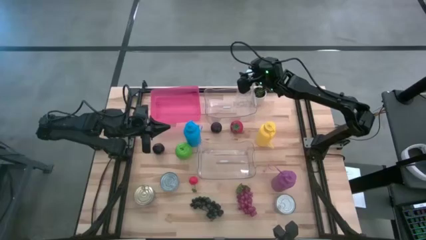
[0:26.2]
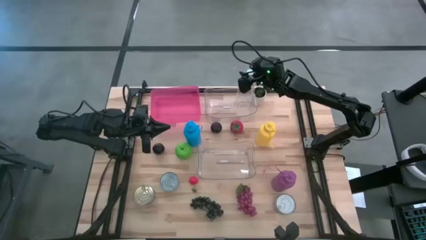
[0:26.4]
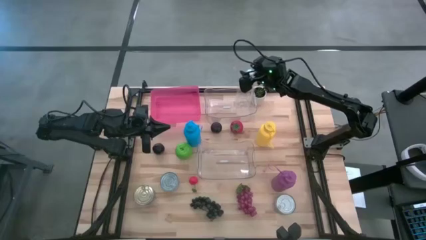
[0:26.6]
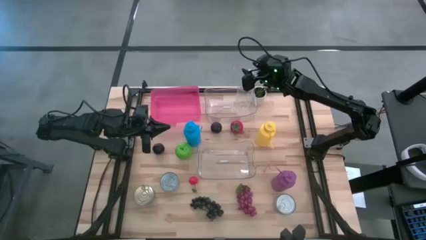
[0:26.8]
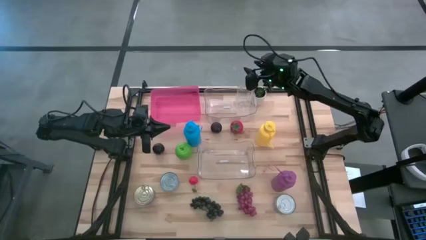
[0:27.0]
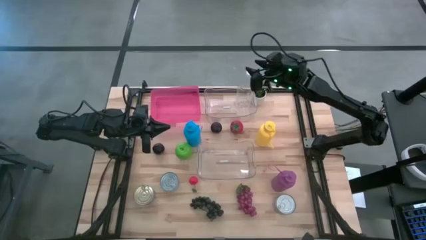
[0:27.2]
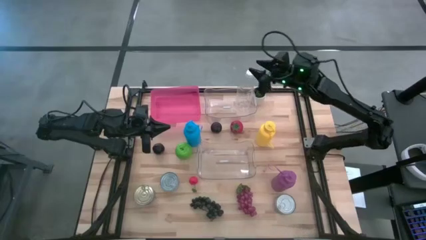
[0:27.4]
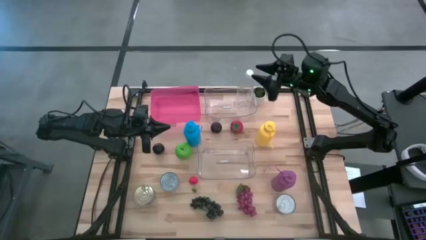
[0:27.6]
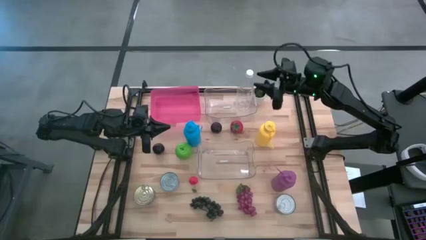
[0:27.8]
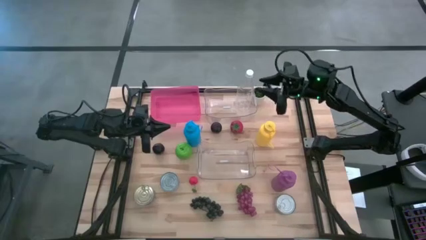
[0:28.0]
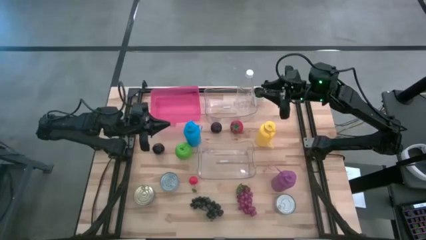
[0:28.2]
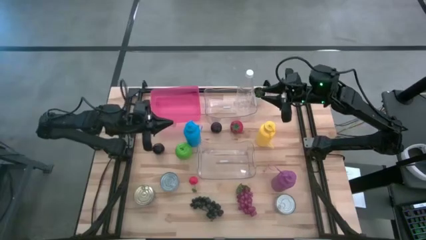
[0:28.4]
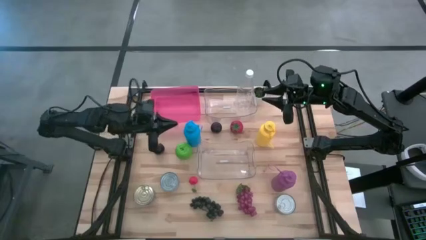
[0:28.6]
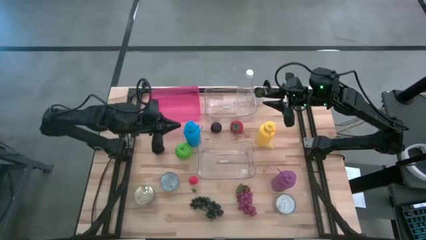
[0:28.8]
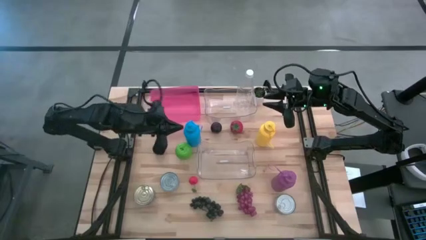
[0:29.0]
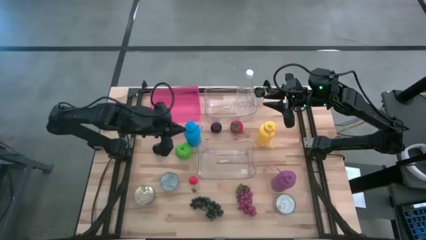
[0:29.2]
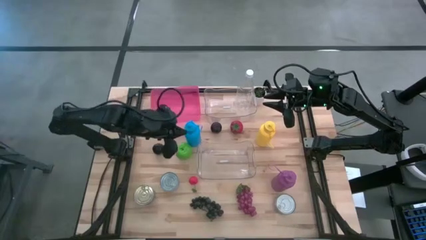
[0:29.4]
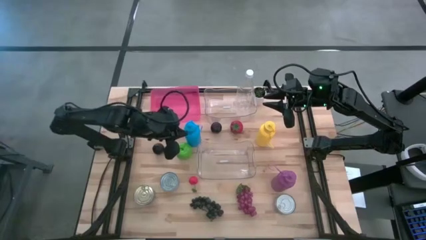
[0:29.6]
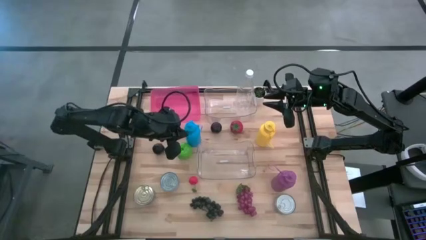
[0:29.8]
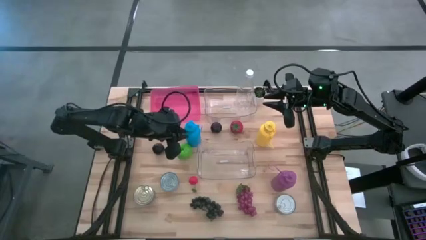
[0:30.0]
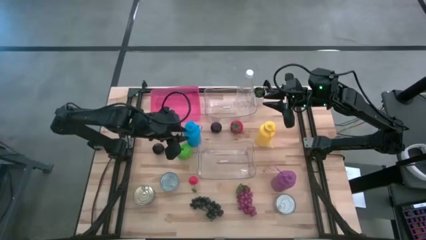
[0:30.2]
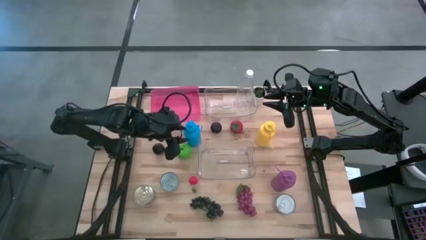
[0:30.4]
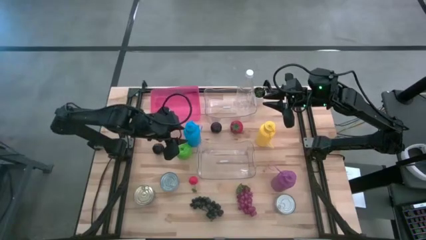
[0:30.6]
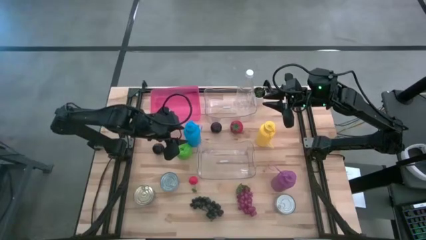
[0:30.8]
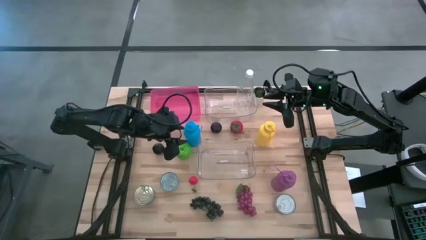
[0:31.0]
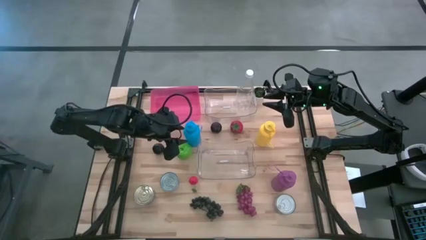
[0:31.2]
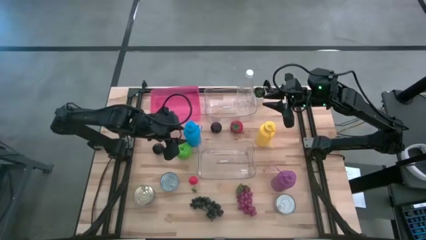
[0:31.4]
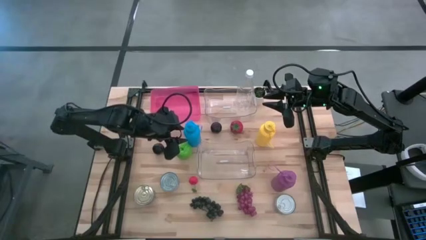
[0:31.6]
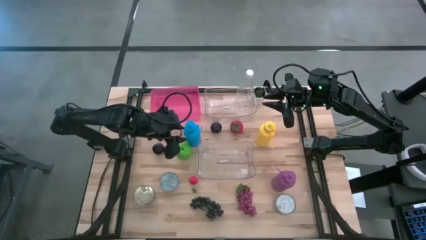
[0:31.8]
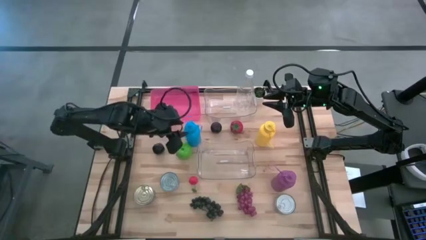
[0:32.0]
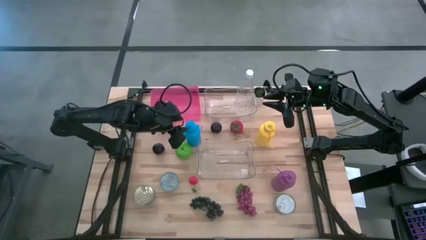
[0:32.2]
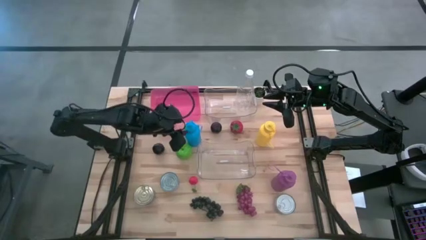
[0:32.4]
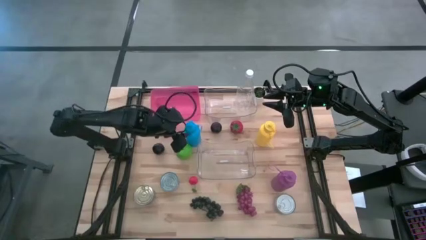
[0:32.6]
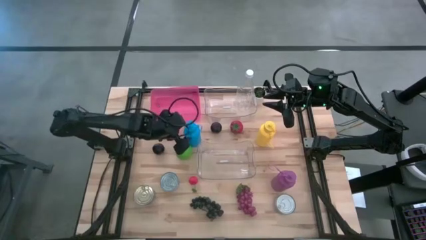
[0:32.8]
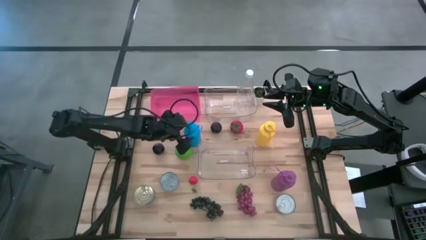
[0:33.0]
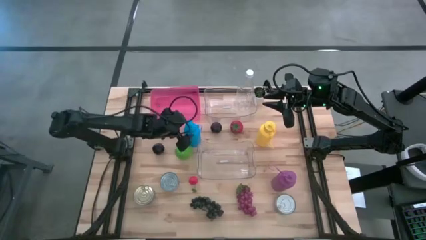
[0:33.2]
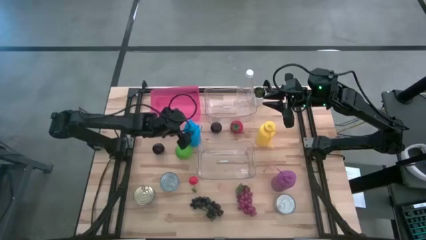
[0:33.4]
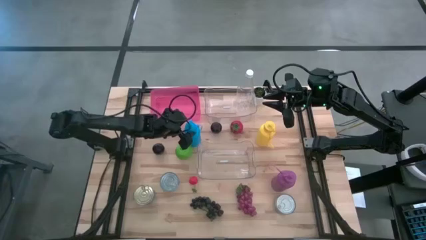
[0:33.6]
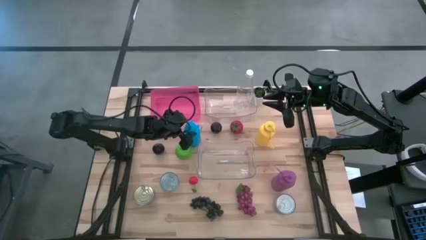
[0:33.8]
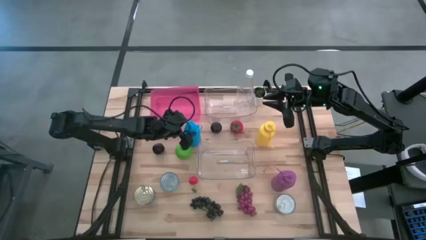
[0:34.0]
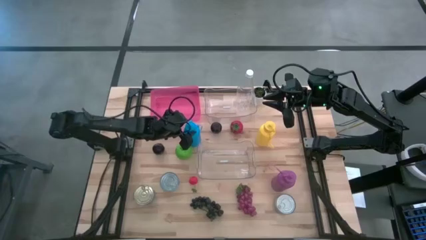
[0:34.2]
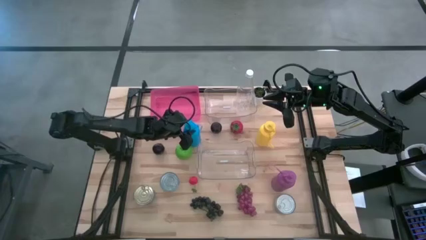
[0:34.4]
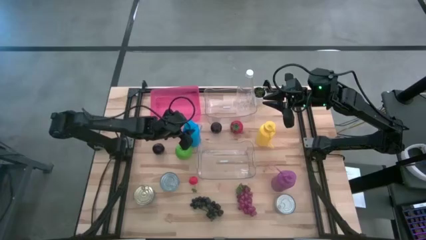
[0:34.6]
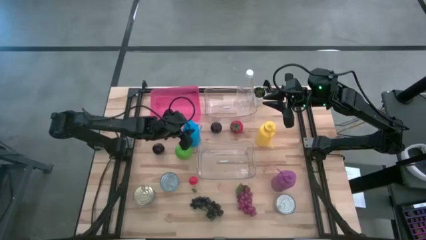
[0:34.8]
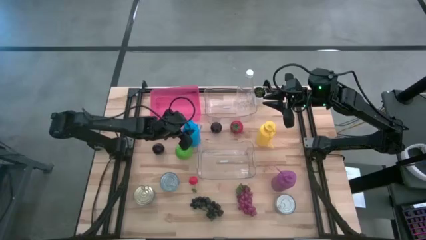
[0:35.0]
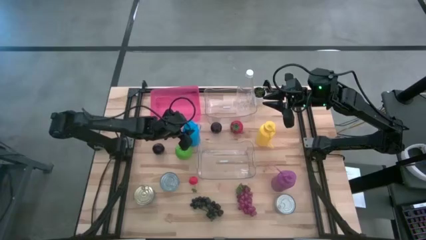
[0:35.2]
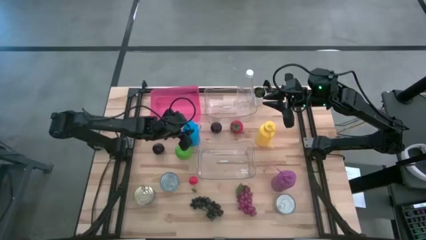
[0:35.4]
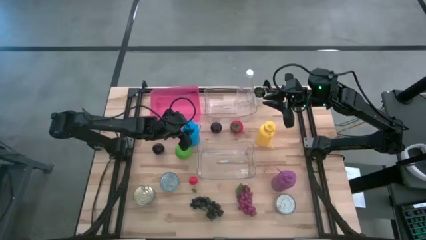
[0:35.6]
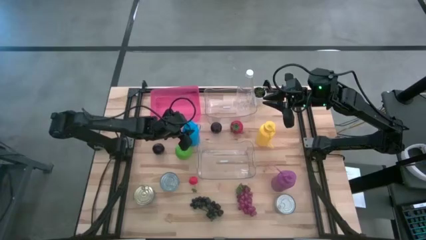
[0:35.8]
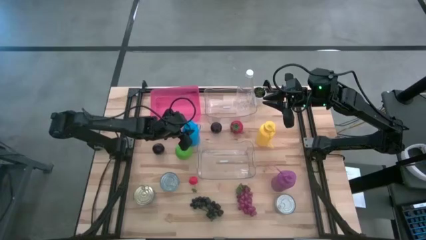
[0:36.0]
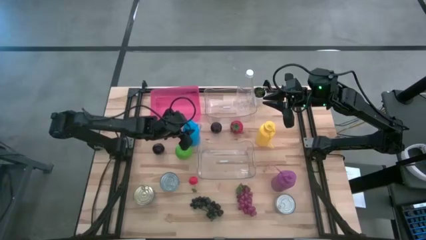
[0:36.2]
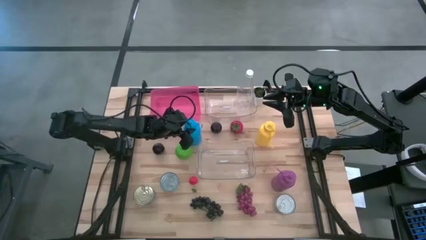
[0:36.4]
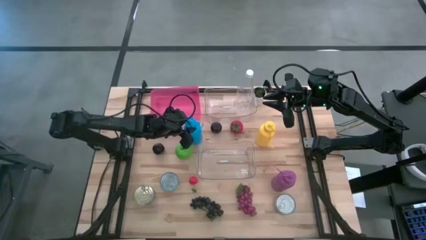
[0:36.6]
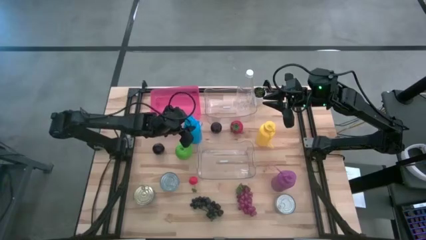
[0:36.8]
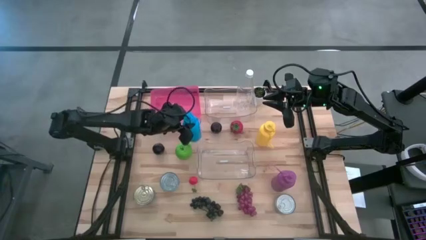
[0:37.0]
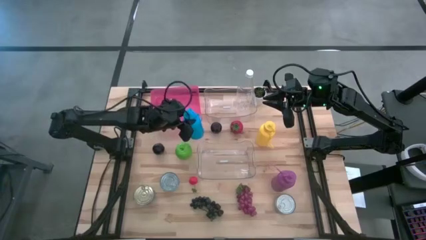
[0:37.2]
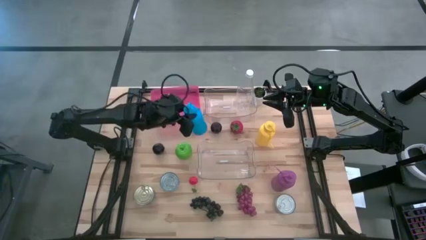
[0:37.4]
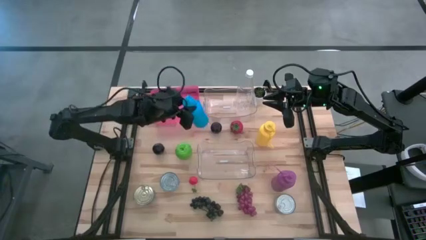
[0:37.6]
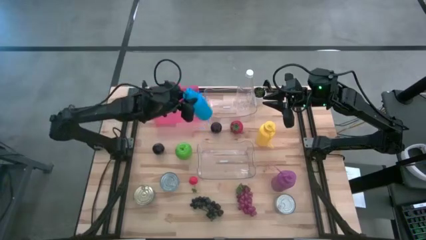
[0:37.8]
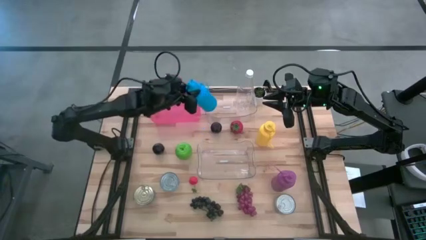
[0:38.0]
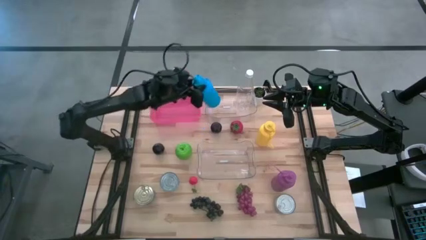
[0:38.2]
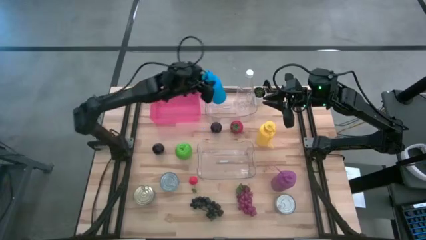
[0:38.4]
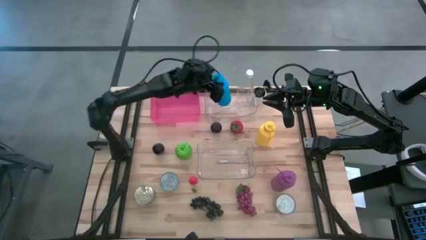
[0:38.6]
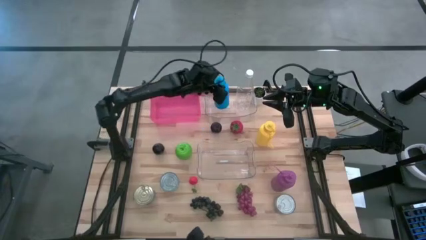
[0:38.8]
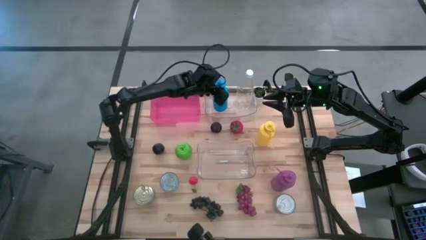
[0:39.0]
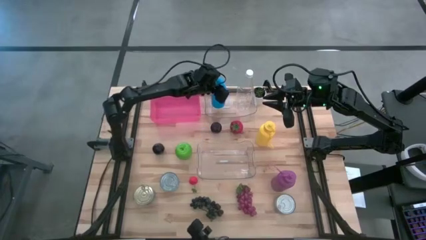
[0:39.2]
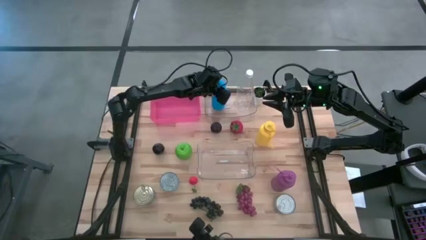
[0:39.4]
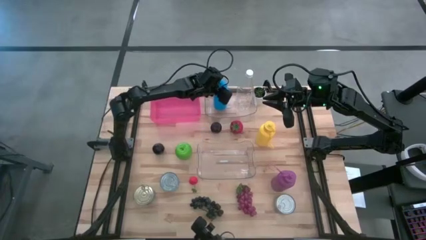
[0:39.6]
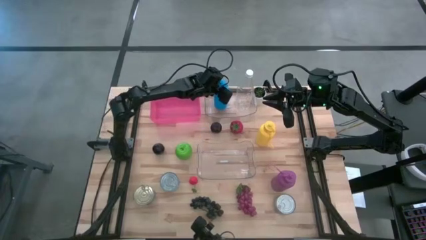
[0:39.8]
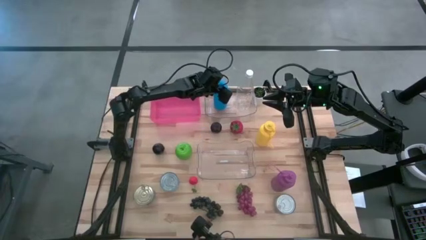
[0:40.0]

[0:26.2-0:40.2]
Task: Pick & Place Food Item
Put the blue bottle into the top transparent bin
